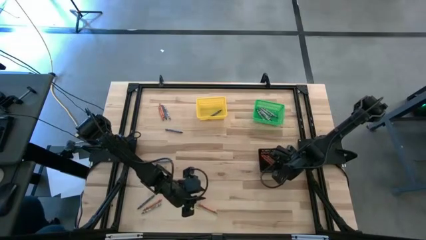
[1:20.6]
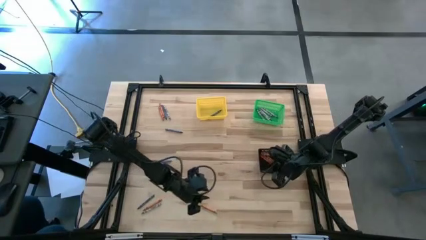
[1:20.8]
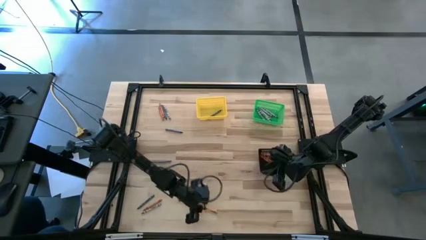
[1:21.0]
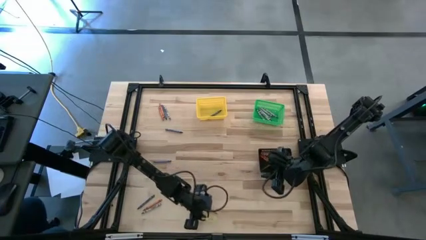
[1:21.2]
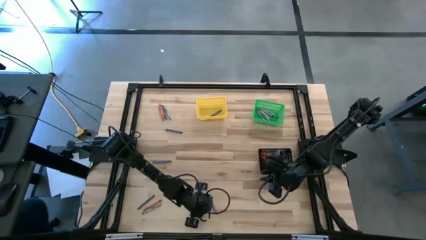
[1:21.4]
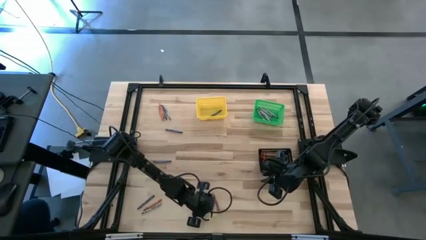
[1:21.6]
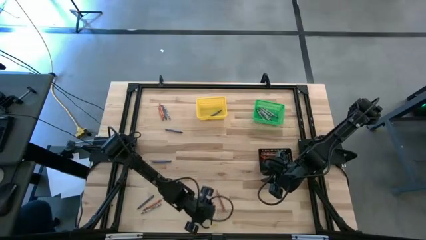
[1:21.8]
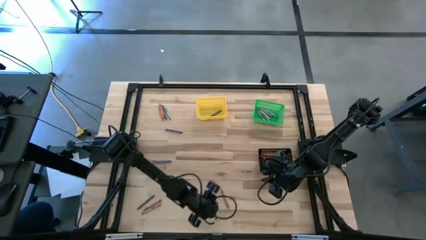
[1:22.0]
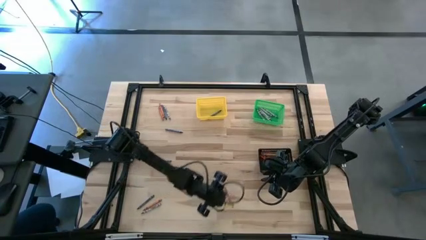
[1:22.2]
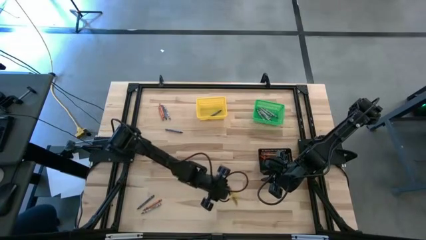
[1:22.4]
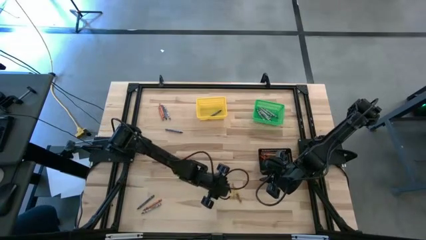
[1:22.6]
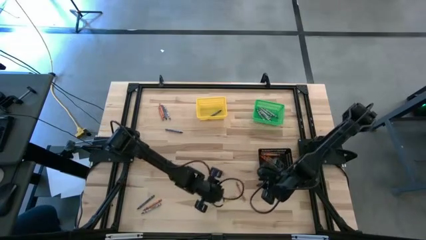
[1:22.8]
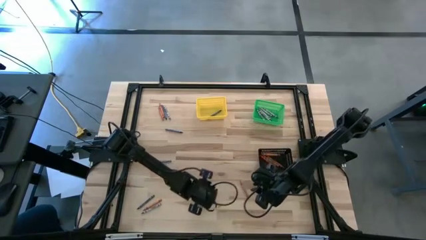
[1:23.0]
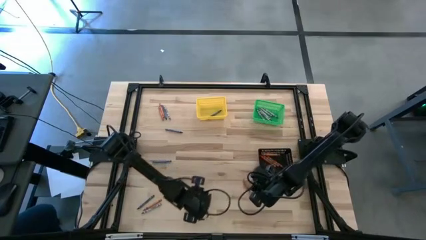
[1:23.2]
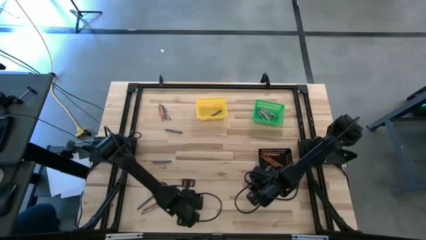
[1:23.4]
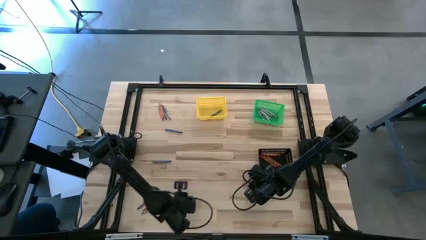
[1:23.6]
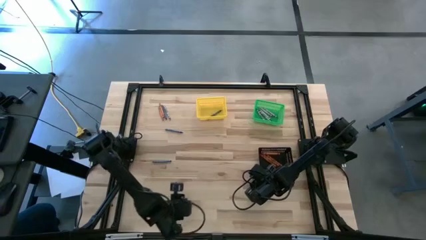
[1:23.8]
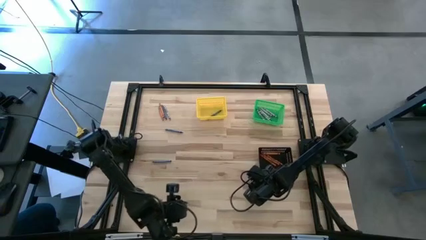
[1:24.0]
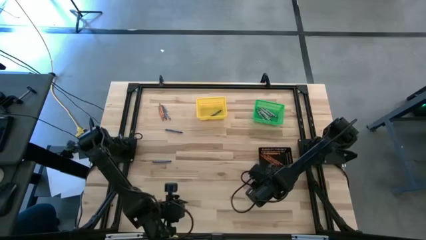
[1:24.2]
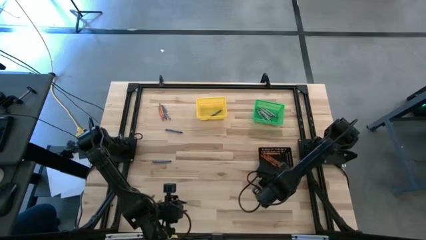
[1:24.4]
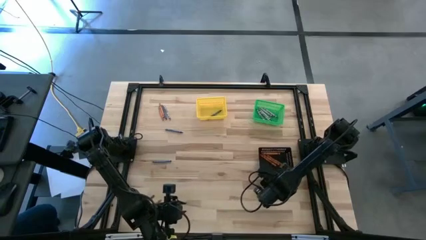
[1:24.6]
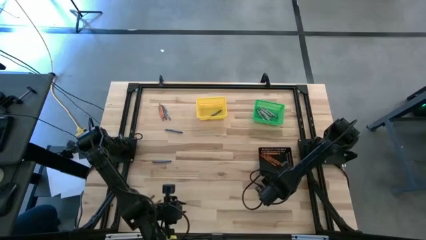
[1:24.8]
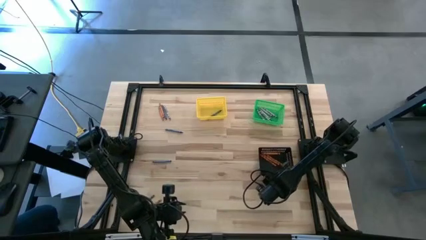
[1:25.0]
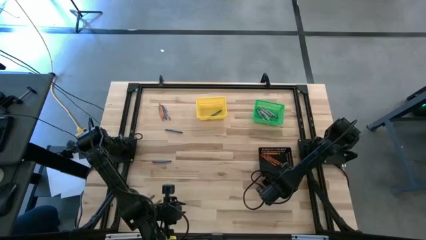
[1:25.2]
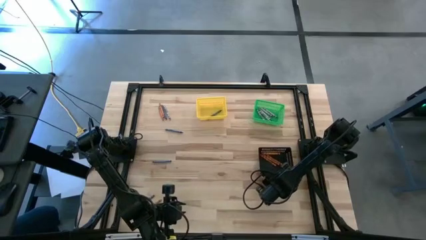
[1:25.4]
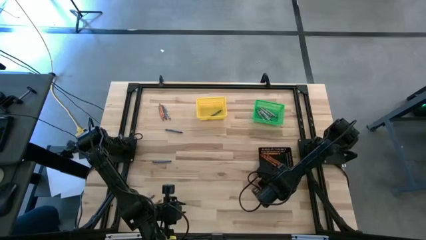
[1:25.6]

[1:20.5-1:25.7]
Task: Sort crayons
Put the orange crayon into the black basket

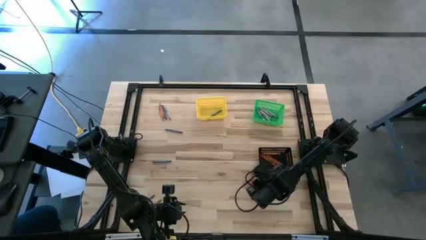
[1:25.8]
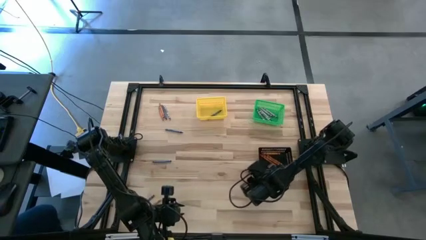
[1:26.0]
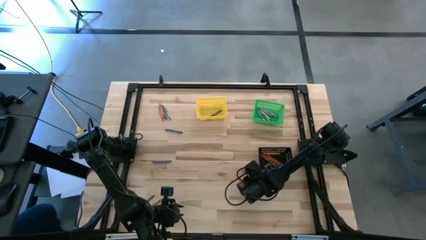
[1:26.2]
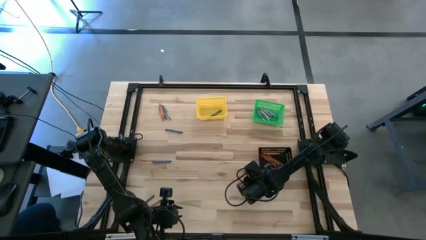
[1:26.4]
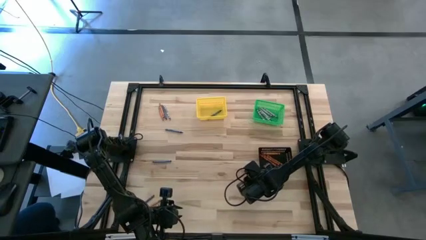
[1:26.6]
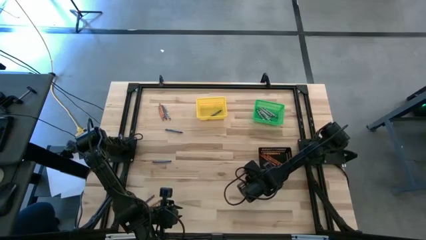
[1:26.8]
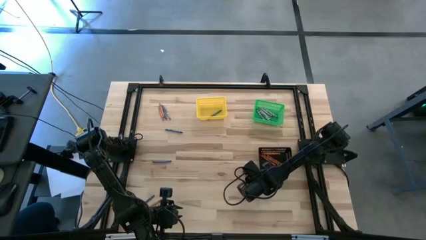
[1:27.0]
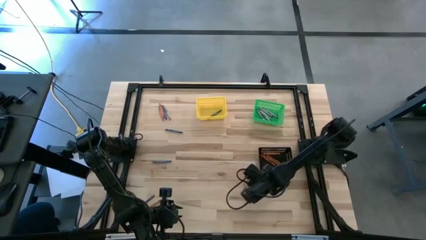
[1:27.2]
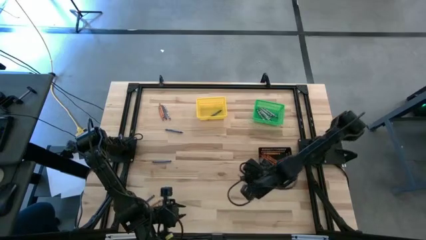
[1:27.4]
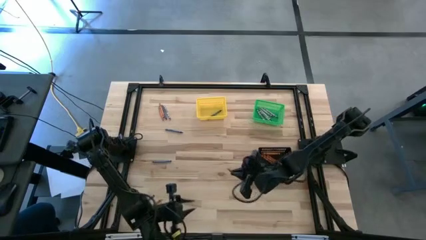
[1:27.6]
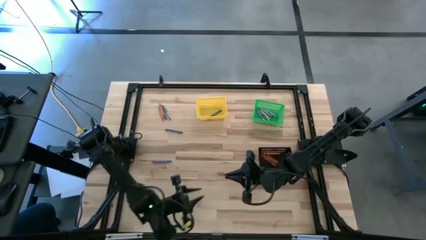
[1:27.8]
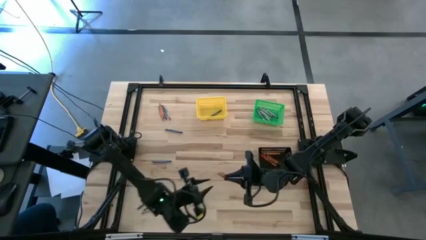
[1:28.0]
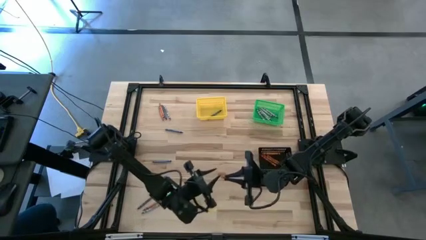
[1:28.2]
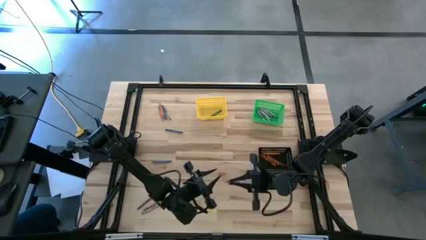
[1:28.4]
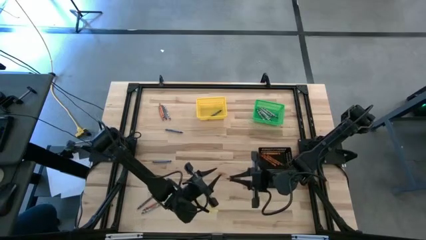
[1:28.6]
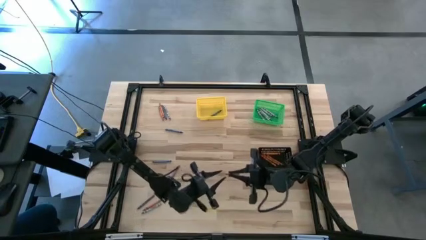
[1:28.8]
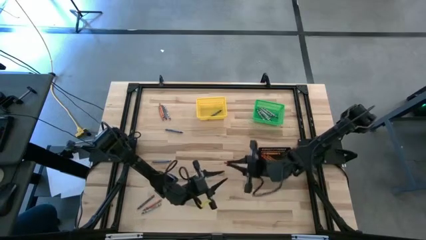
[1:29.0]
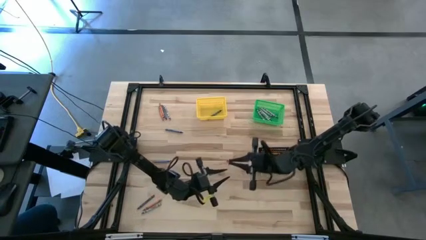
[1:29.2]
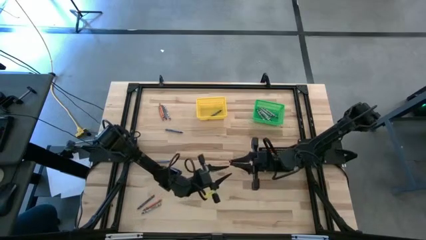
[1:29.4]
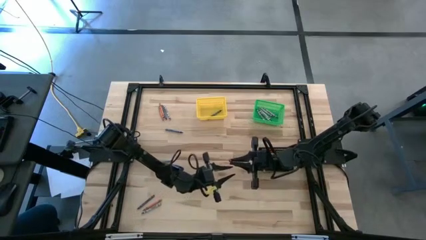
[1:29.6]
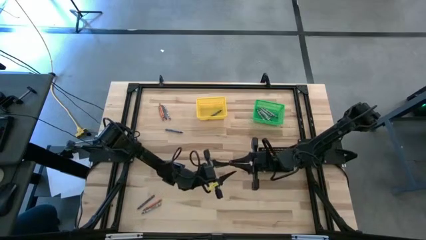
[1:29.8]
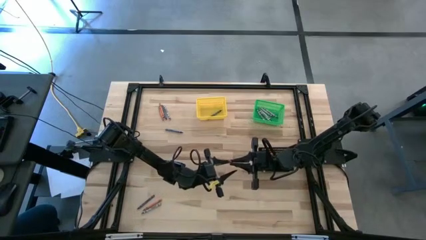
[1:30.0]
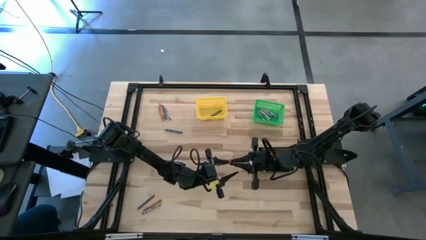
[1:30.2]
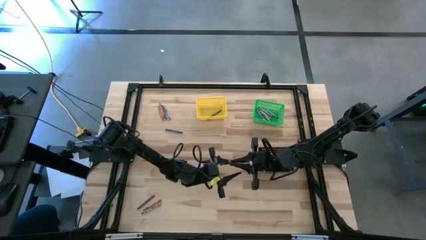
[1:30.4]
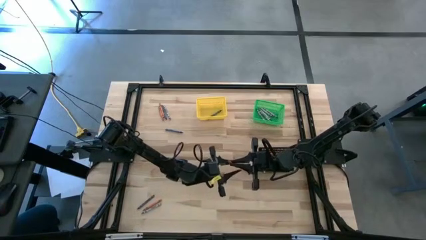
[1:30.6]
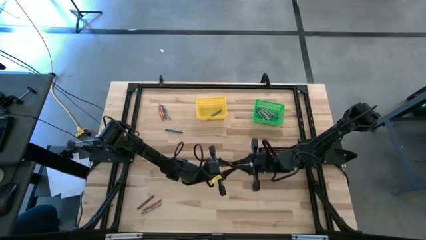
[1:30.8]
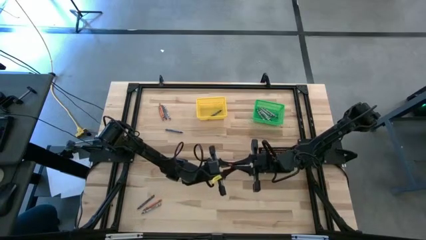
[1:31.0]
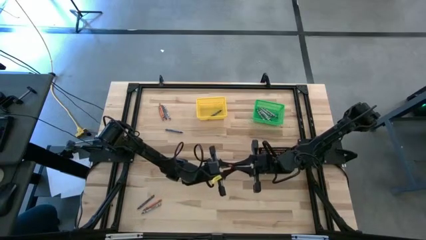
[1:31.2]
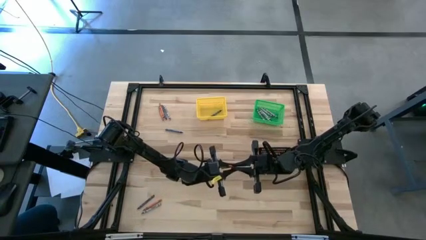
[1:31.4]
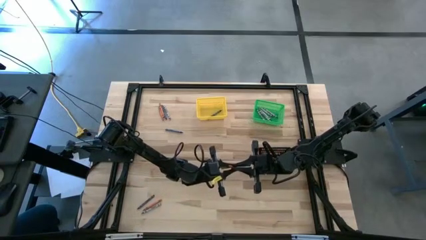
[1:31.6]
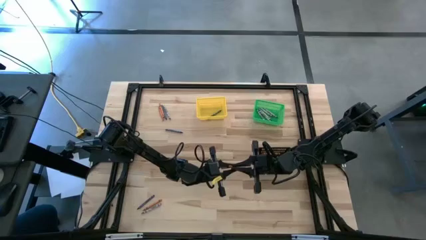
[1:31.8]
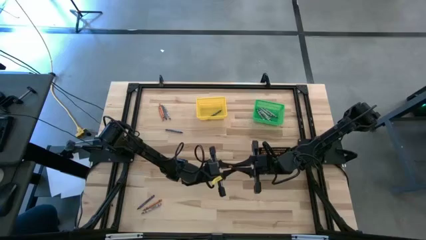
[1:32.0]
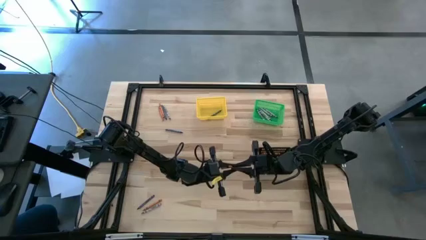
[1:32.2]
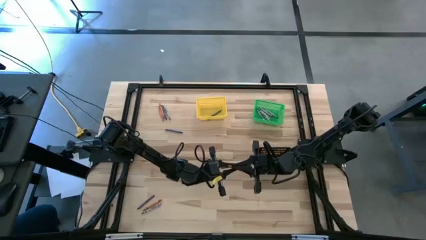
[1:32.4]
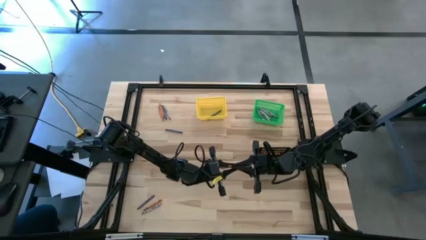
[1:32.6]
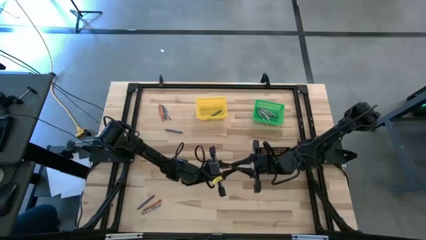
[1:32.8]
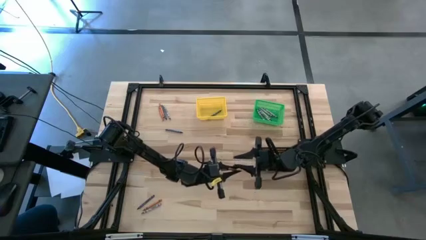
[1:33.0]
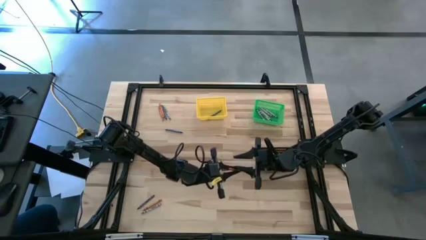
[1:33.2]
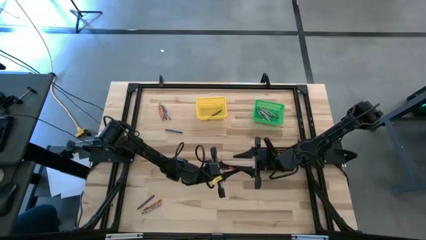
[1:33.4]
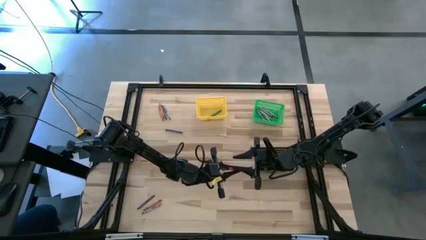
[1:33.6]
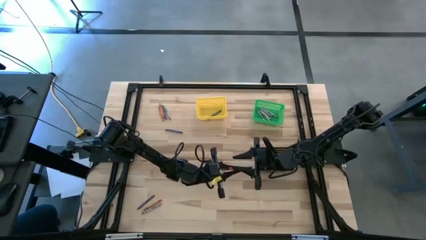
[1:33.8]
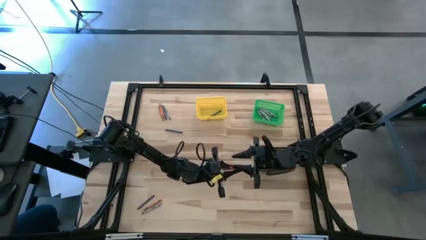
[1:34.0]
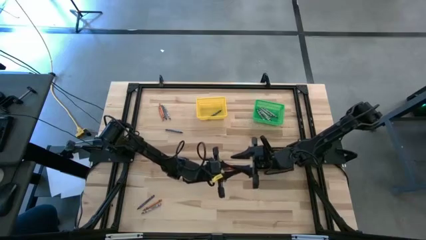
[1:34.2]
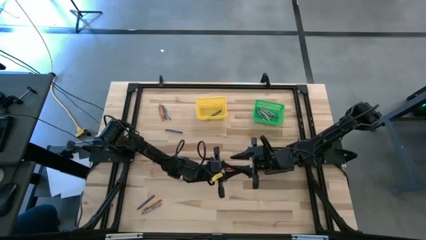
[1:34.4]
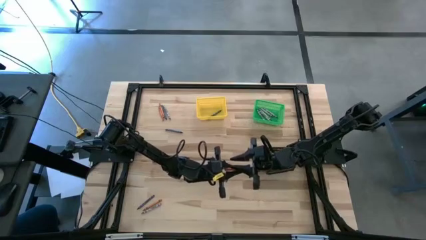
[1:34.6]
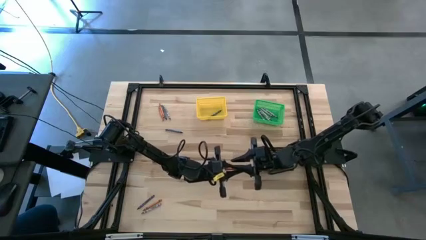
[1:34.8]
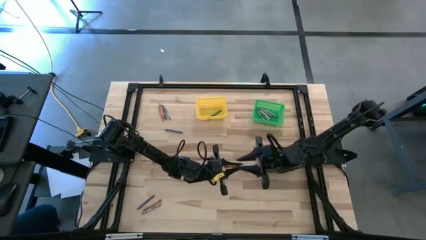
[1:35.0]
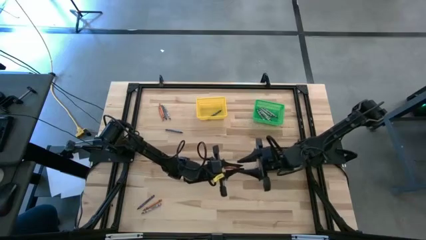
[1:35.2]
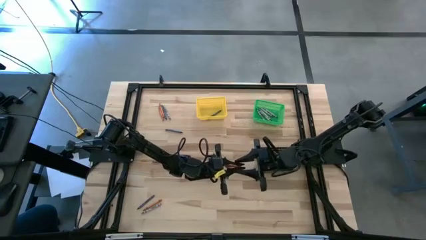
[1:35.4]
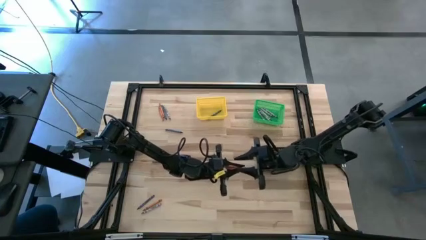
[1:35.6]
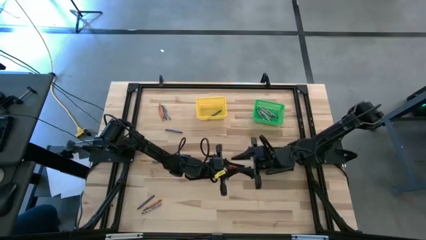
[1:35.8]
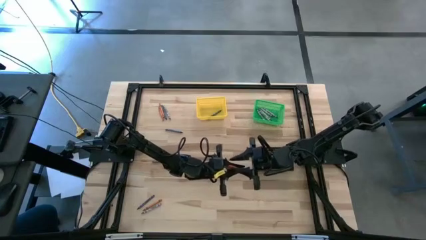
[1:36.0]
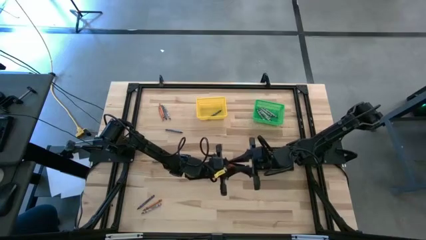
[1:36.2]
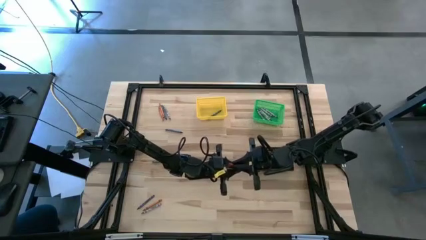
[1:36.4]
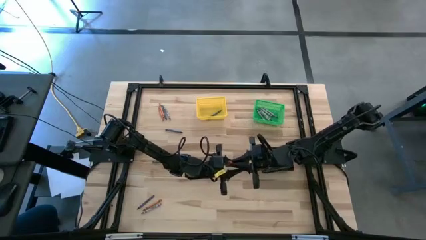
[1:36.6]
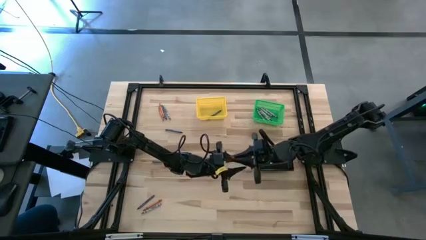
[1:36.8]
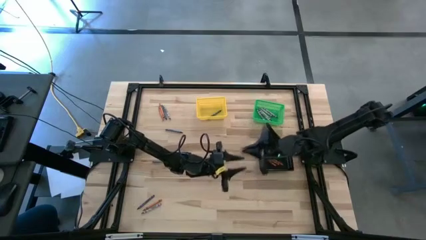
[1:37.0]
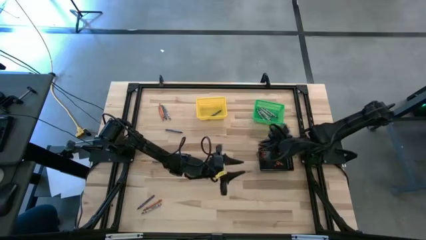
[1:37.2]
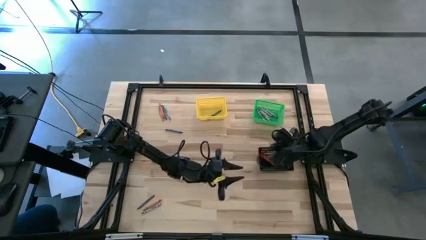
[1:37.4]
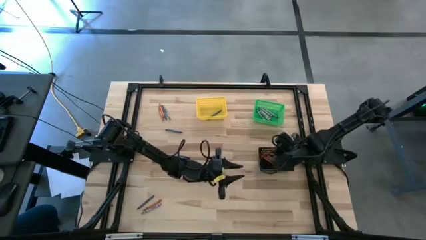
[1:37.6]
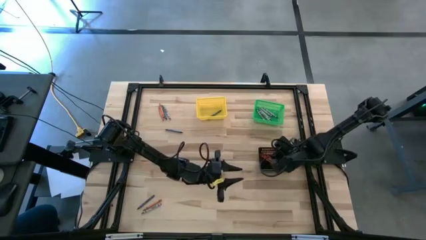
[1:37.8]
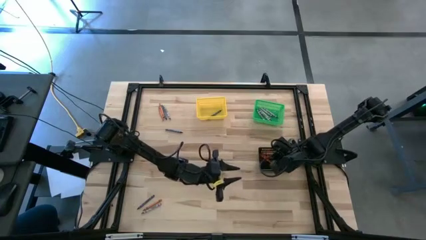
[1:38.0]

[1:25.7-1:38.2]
Put the orange crayon into the black basket
